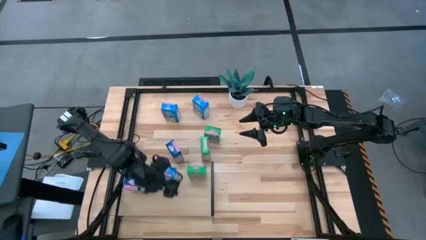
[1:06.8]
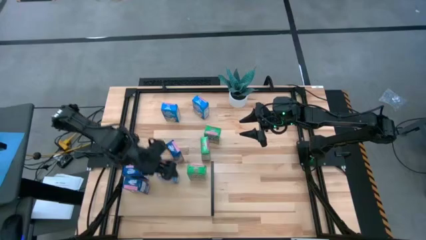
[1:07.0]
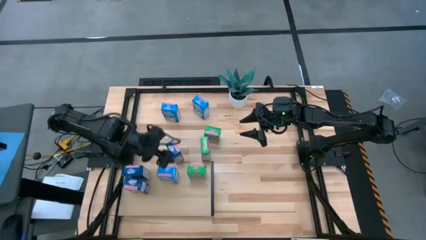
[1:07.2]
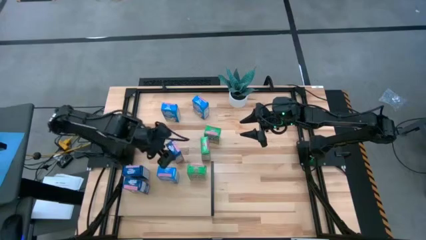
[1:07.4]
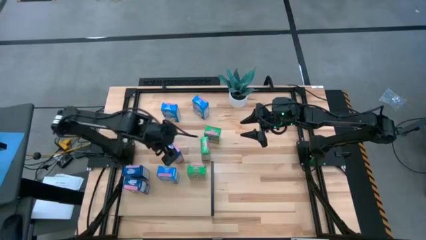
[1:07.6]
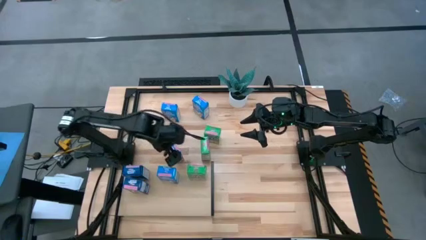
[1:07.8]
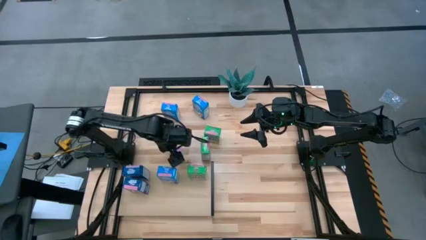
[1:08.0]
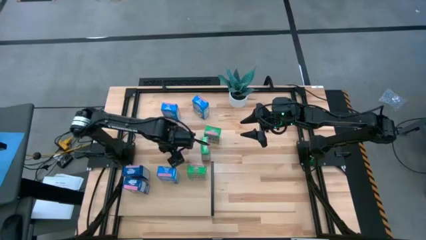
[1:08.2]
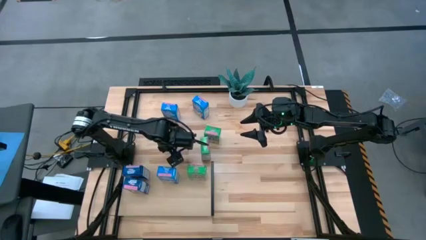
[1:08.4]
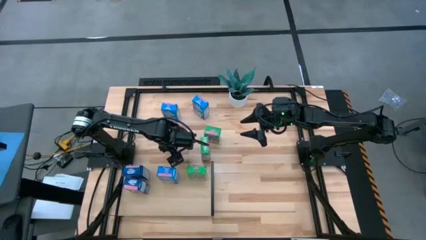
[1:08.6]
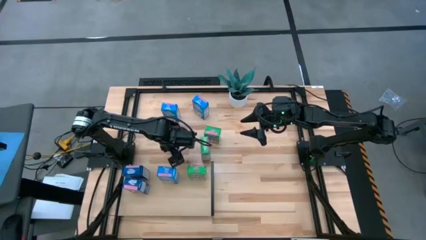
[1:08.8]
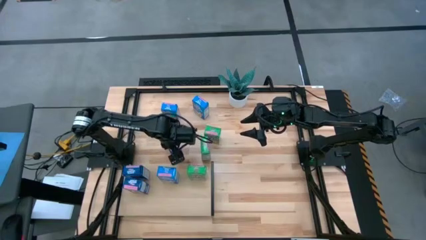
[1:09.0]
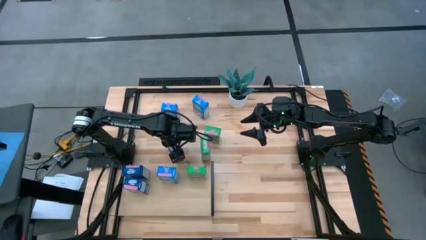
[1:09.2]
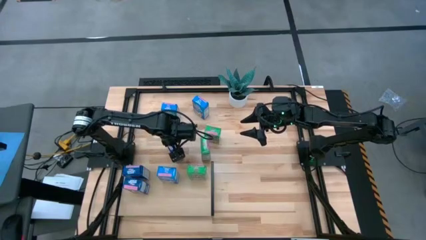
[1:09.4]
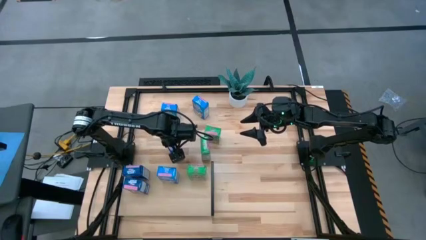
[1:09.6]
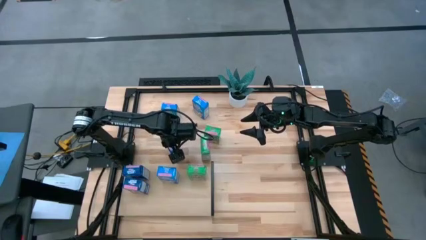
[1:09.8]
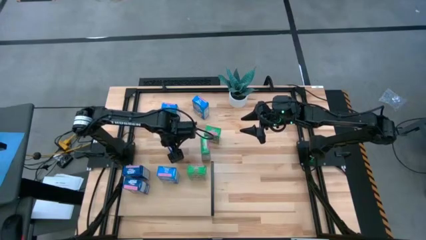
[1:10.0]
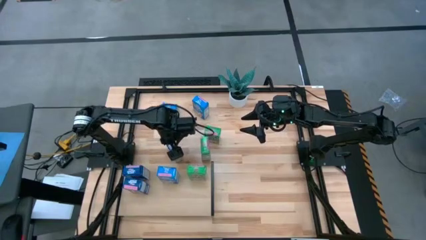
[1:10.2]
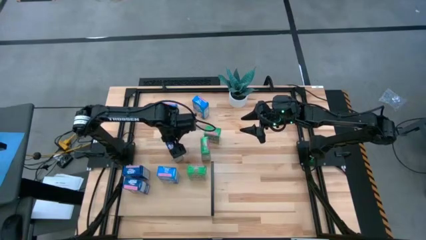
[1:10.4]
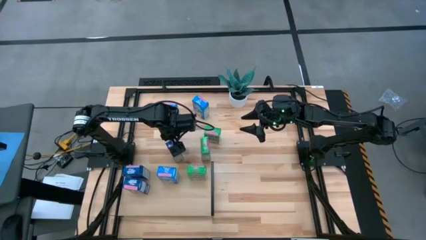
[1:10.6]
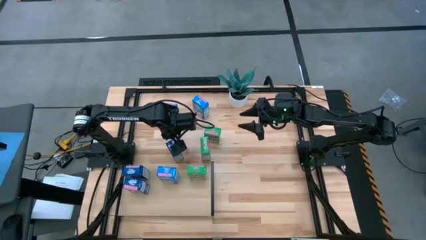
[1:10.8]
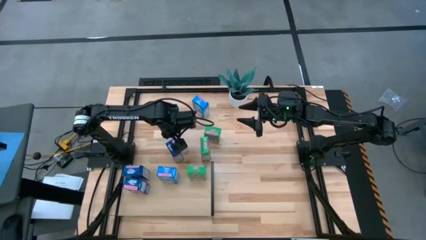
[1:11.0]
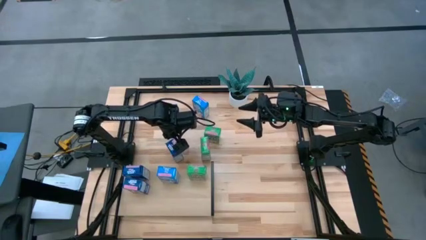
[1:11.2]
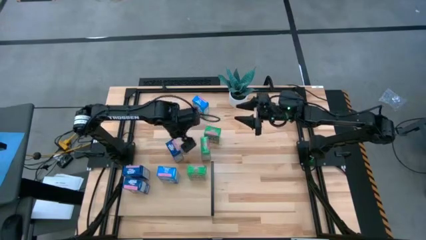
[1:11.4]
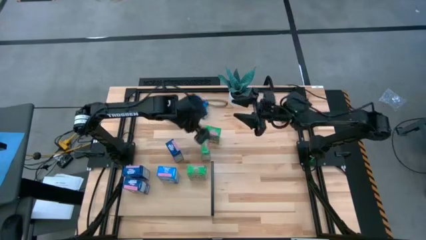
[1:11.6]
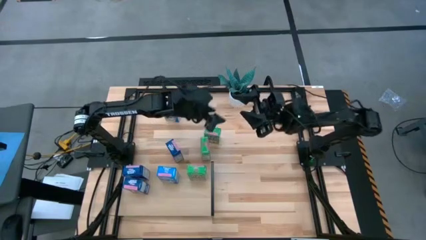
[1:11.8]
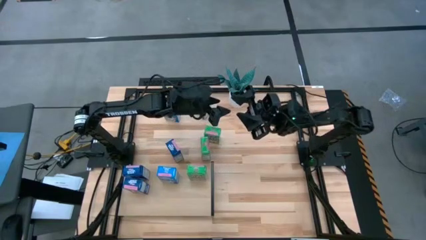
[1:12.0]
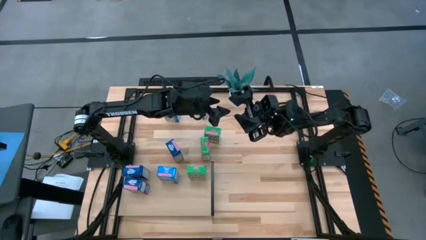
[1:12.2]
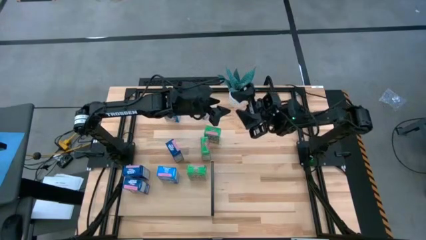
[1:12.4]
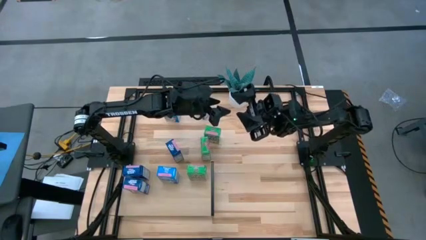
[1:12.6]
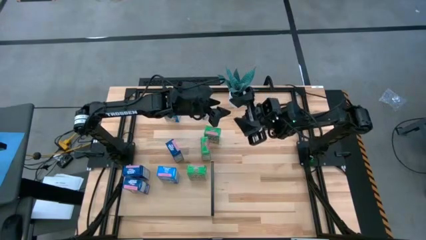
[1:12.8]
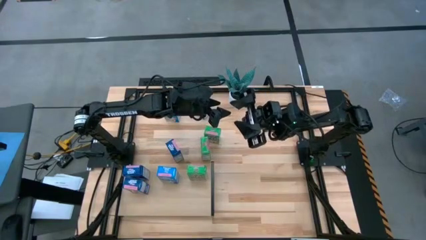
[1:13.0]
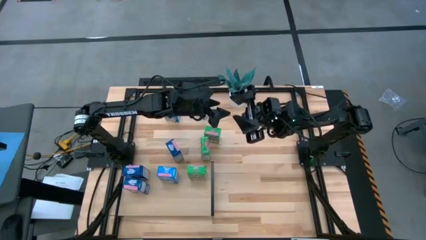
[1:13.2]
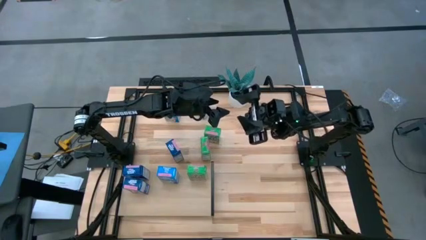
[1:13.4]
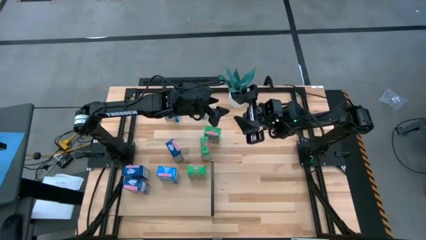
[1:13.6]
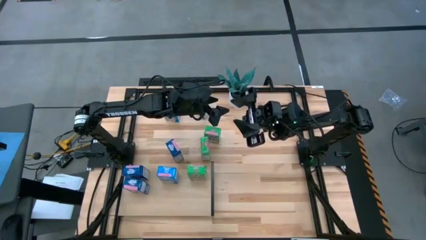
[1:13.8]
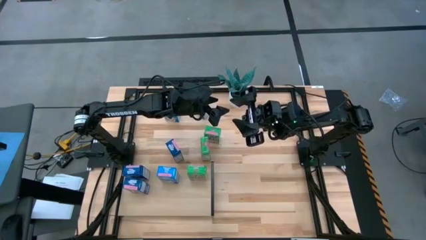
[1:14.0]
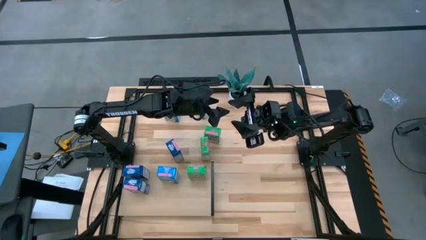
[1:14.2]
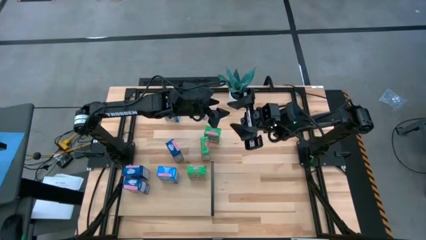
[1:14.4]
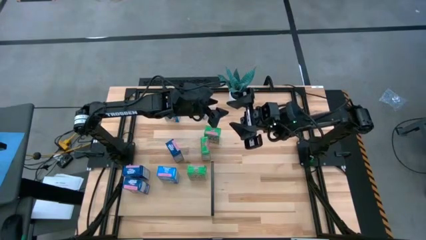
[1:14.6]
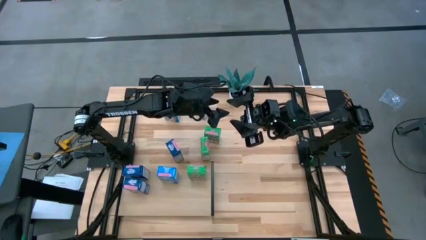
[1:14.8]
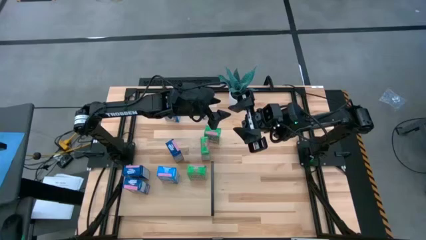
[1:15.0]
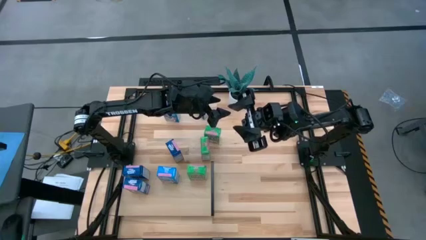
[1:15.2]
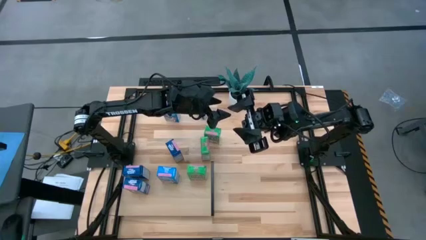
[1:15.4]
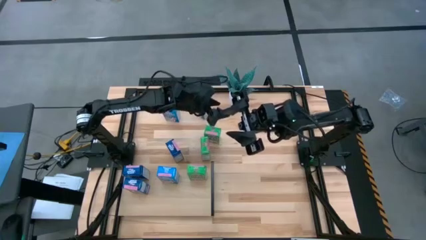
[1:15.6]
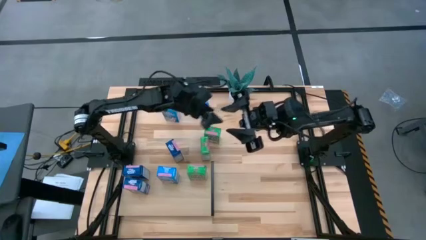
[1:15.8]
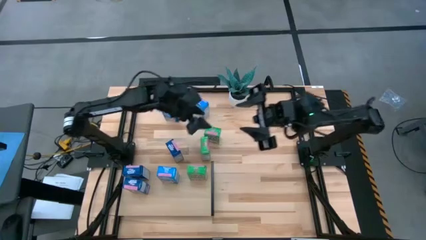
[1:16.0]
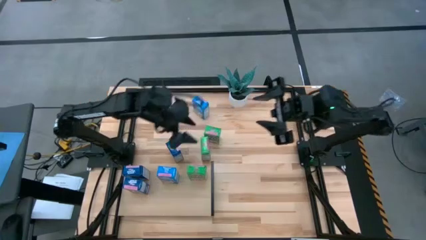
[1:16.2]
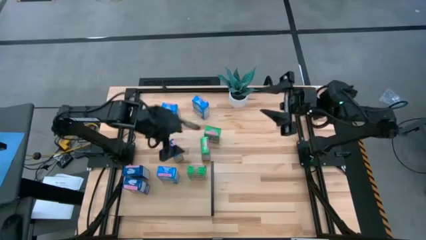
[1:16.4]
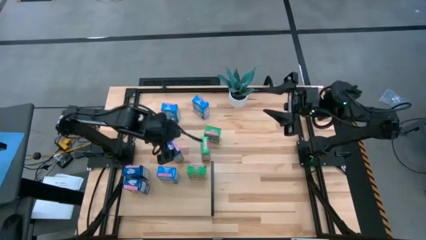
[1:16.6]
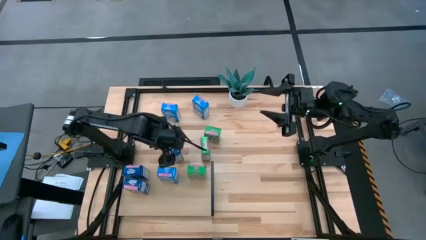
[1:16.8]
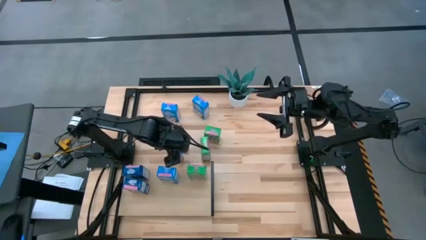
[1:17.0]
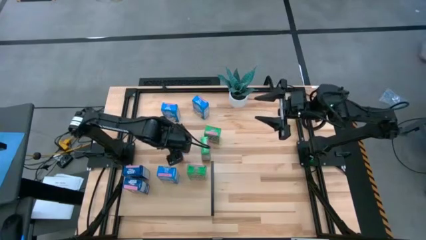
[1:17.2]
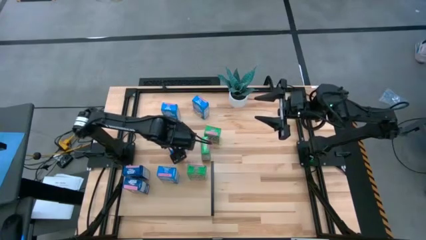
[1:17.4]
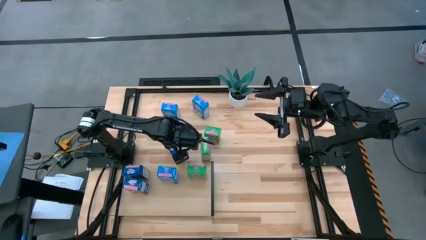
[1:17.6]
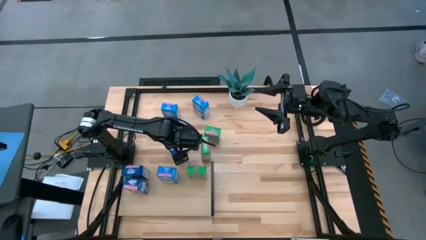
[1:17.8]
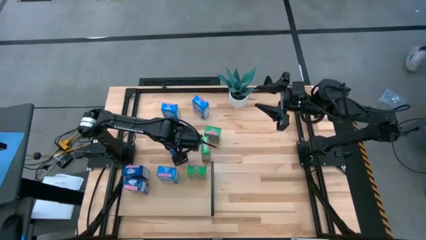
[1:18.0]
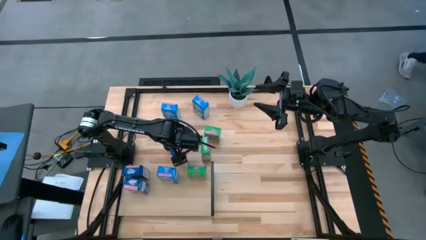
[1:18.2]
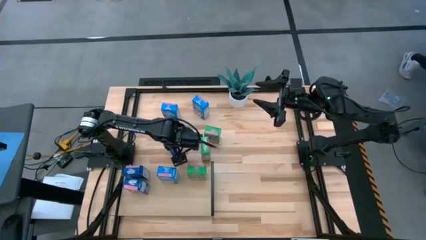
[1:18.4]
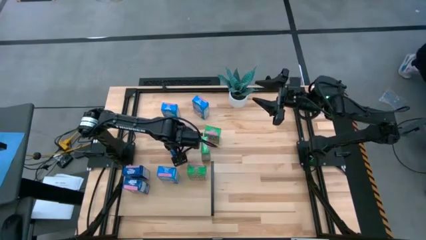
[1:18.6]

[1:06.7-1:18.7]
Task: Stack cereal on shelf
Put the blue cereal box on the shelf aligned with the other blue cereal boxes

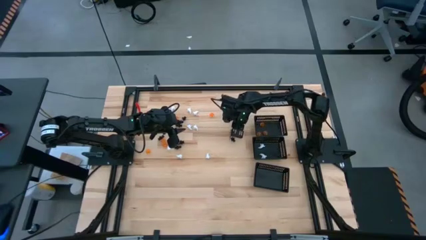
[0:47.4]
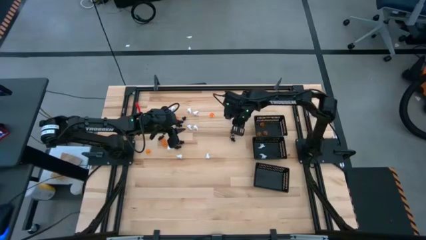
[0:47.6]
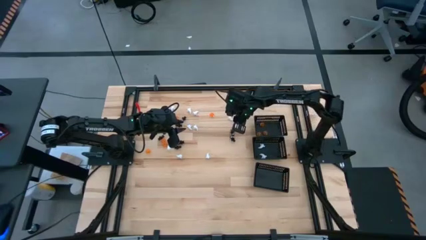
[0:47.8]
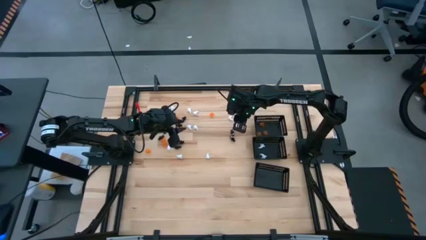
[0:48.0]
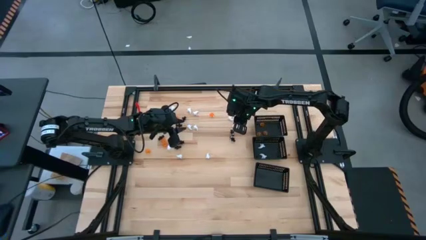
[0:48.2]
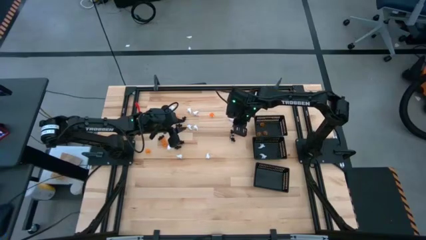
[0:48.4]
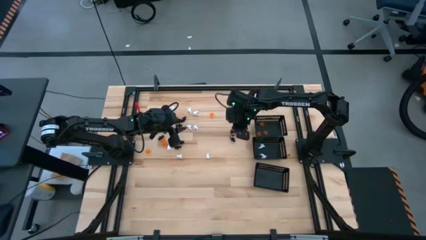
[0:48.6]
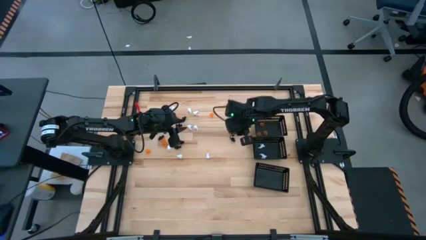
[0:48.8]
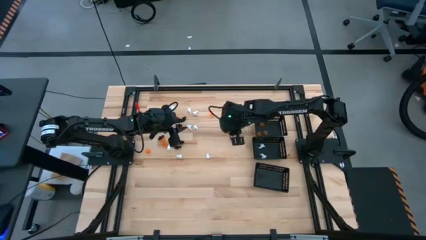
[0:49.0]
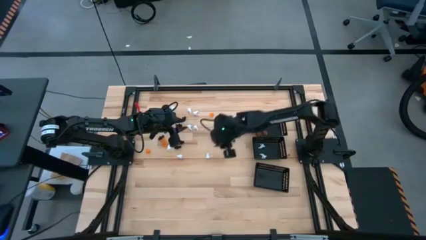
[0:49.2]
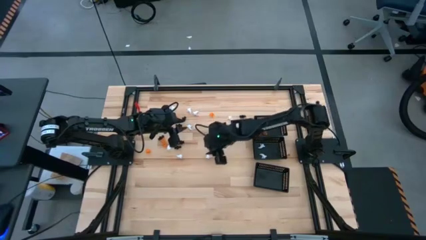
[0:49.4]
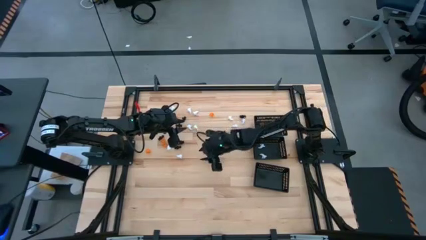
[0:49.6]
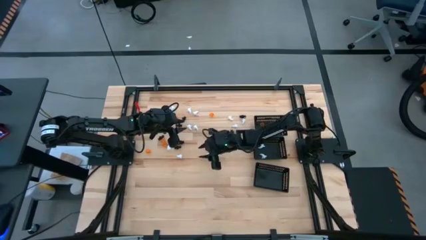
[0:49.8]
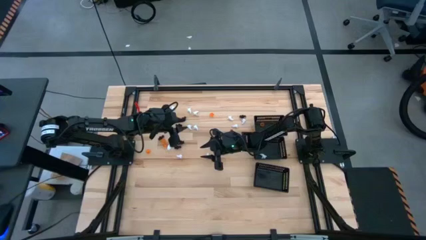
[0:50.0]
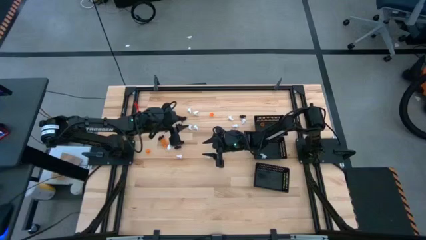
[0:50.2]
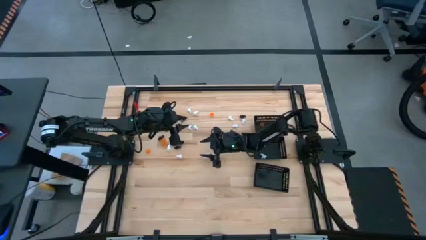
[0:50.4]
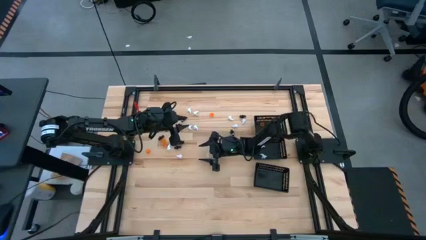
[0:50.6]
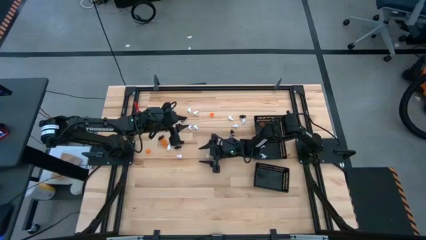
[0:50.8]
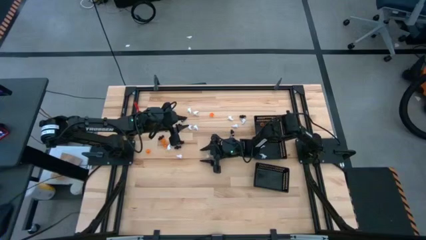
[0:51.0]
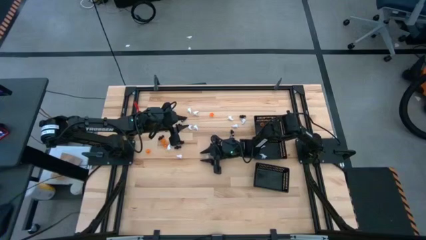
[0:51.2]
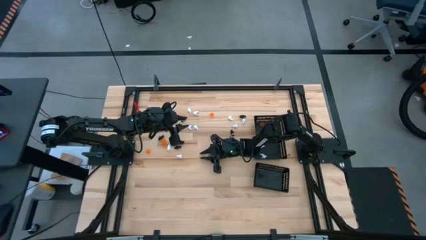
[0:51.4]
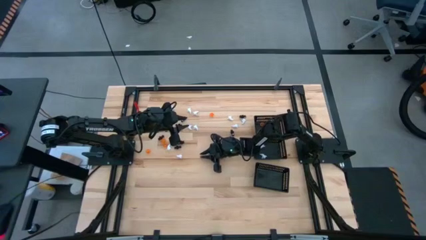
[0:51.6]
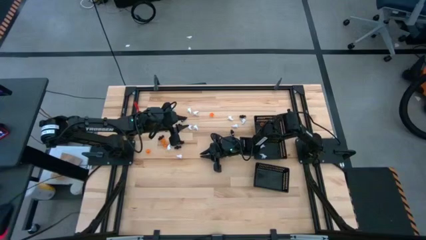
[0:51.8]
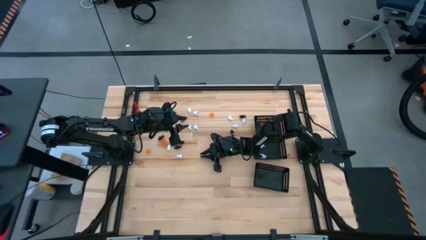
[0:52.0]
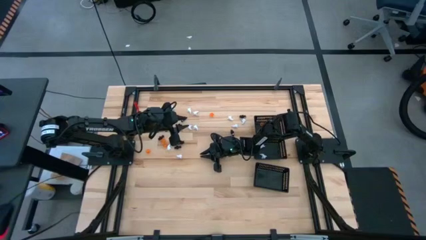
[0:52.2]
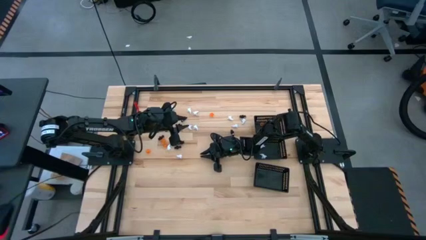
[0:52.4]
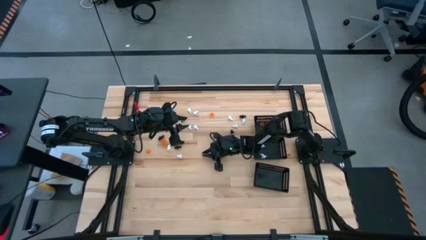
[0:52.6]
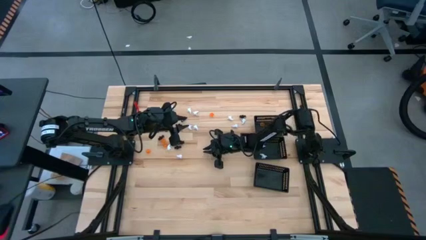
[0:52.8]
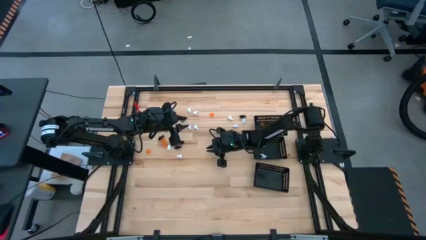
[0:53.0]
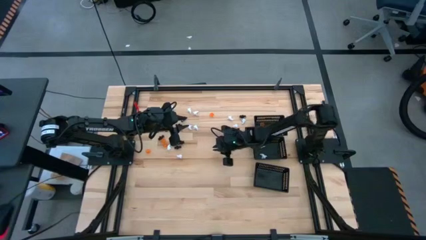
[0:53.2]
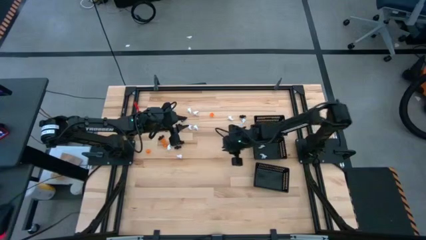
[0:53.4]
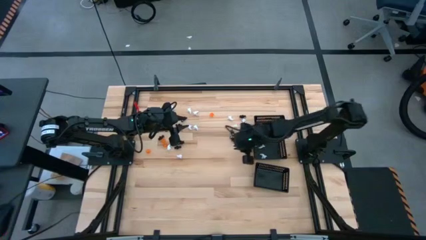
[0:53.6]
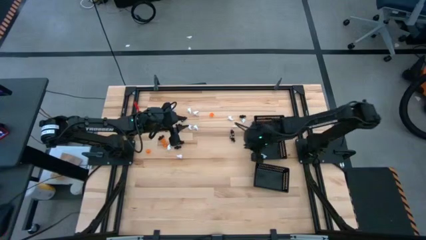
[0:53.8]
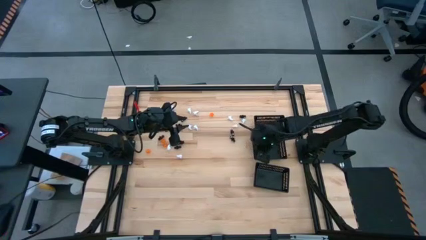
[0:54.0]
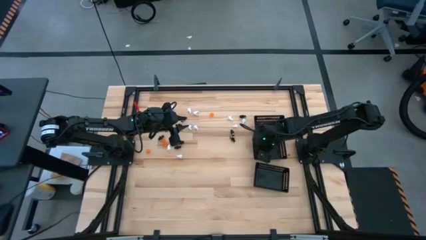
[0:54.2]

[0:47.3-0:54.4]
Task: Sort Halloween decoration
Put the white ghost toy into the center black bin
